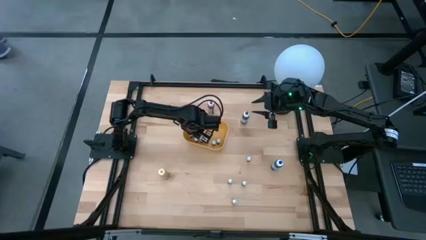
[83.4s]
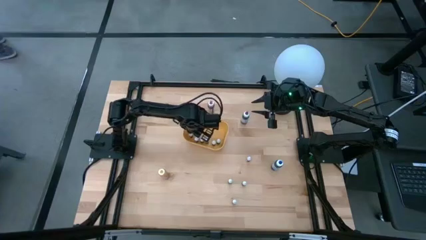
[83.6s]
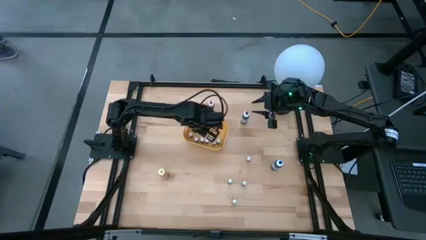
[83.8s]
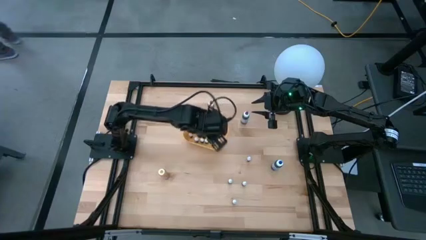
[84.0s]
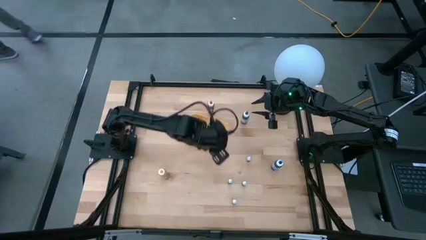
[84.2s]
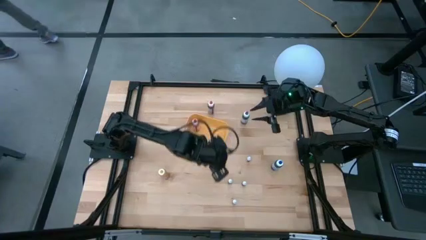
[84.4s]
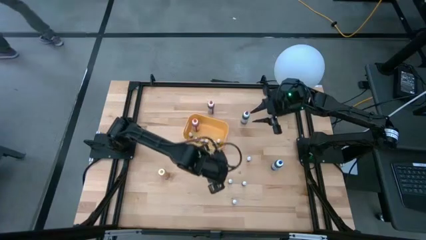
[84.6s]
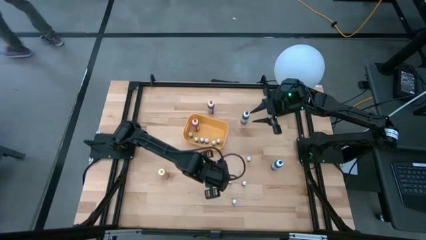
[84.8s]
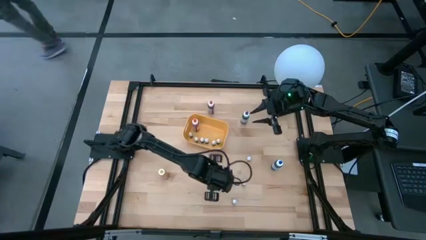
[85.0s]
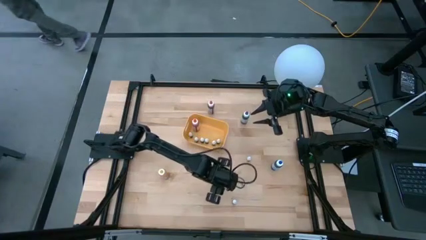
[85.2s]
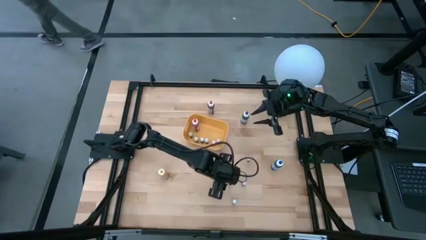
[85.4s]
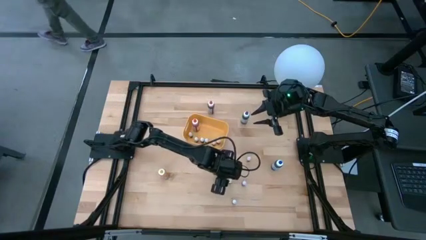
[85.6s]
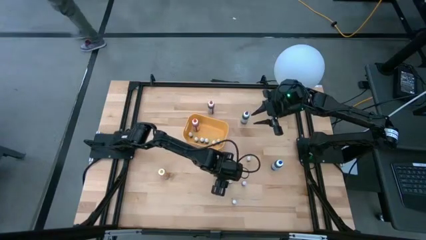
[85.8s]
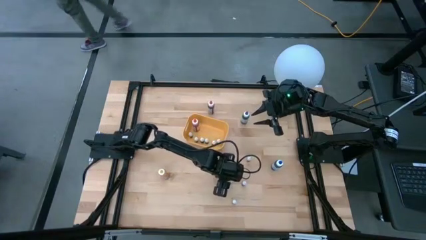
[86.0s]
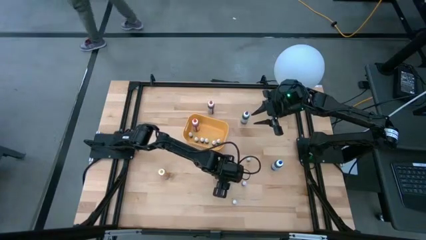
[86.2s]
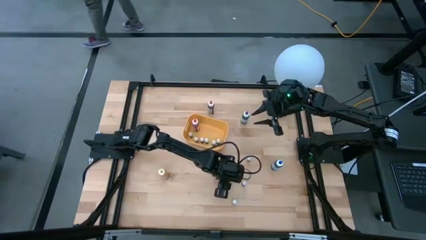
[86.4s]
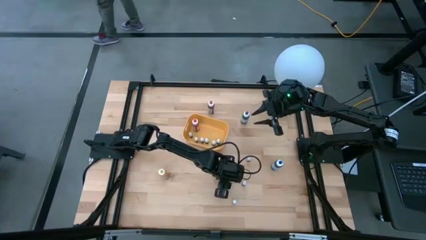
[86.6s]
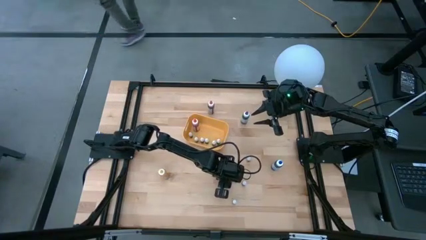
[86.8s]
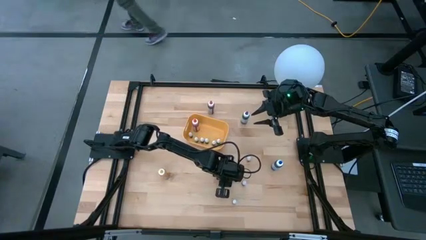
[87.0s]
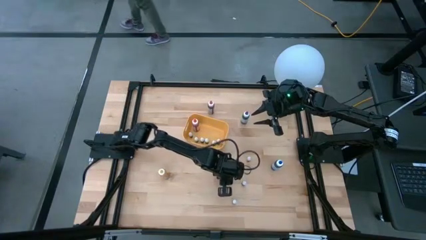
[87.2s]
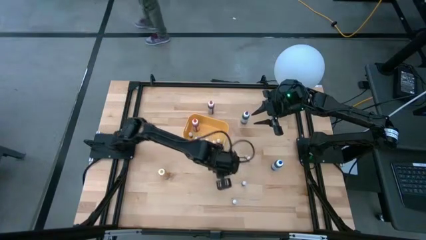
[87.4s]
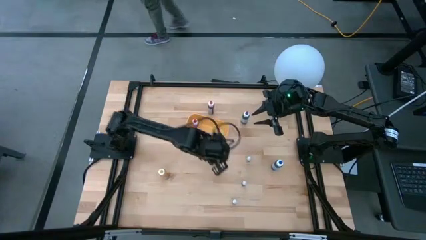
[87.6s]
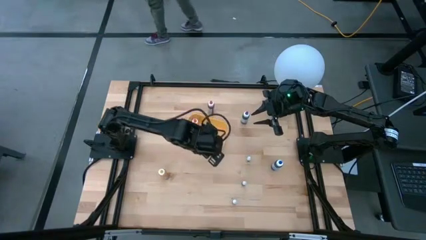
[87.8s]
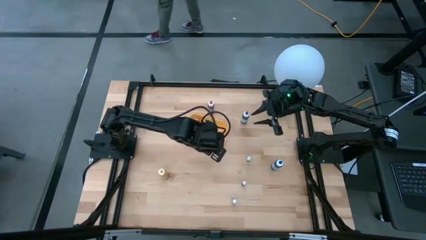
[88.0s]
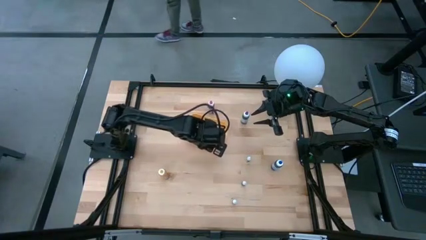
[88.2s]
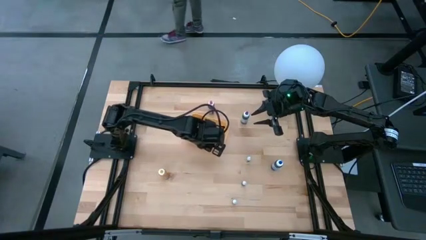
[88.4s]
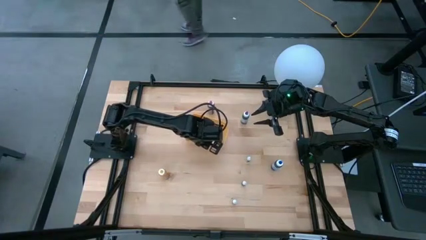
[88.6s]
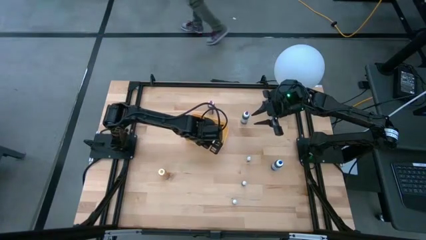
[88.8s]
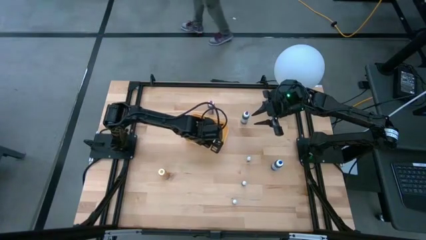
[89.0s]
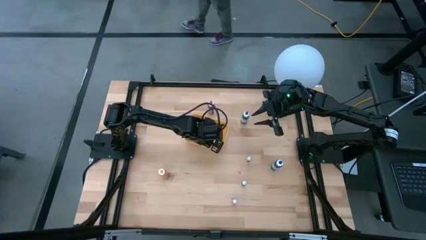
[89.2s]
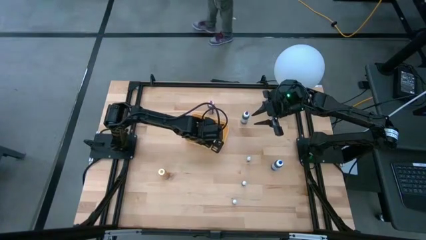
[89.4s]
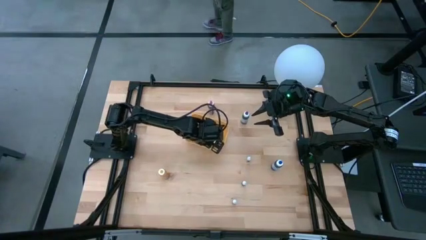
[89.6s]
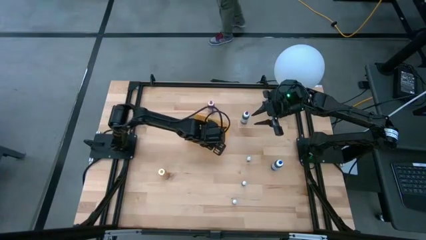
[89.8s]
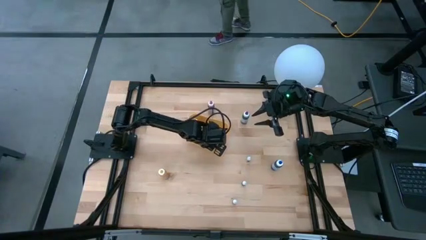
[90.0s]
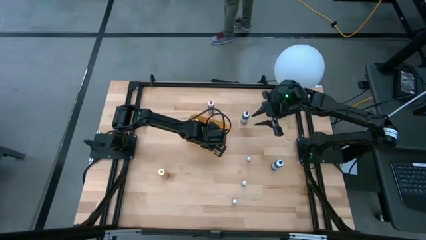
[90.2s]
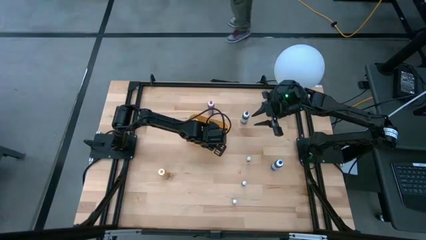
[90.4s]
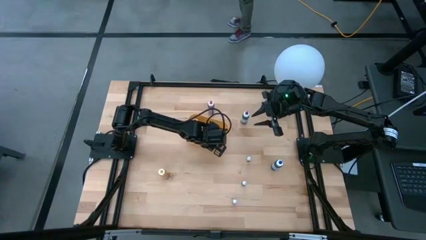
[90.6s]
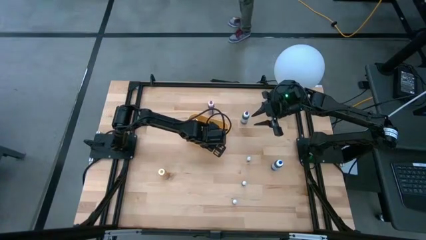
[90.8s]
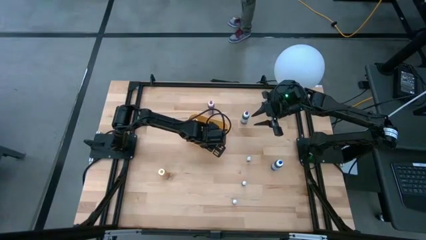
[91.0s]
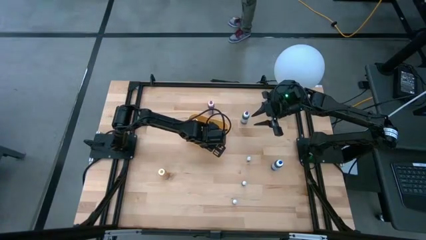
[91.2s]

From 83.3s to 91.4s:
Task: Pick & Place food coloring
Put the small blue food coloring bottle into the yellow bin

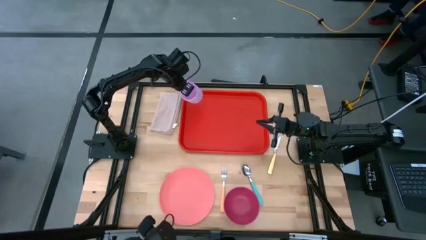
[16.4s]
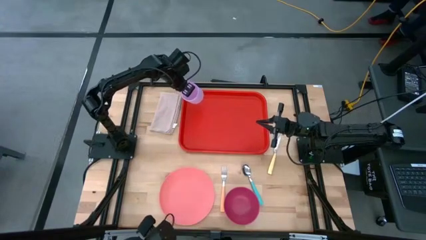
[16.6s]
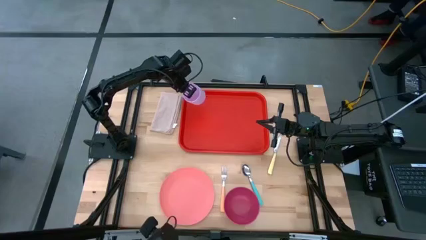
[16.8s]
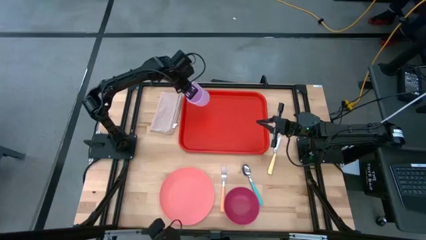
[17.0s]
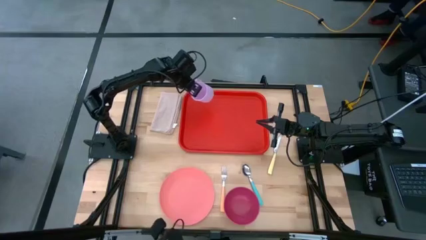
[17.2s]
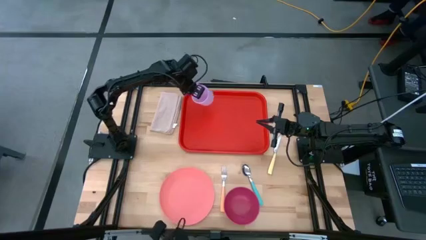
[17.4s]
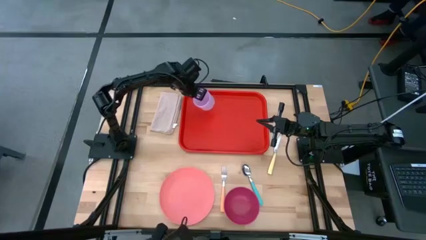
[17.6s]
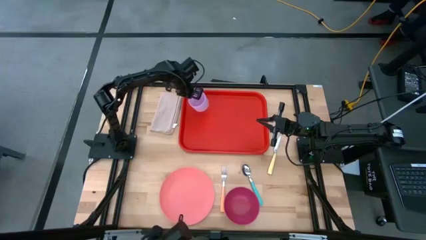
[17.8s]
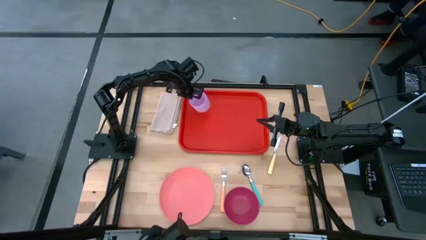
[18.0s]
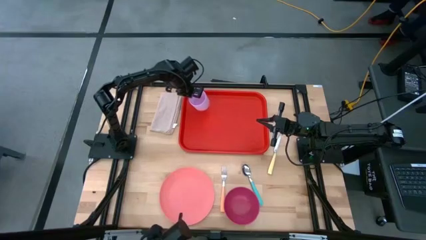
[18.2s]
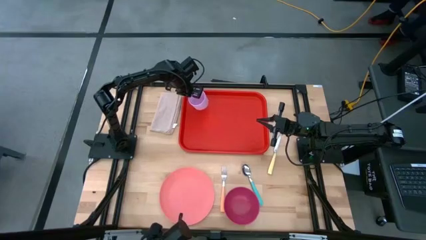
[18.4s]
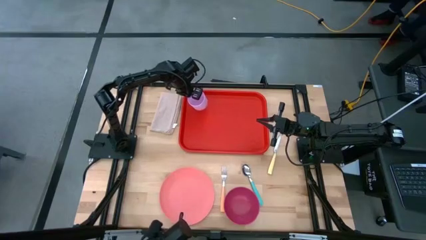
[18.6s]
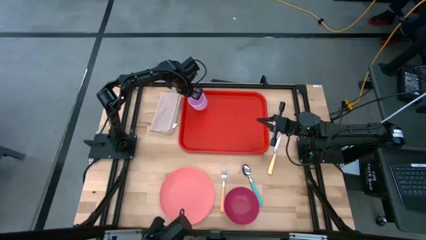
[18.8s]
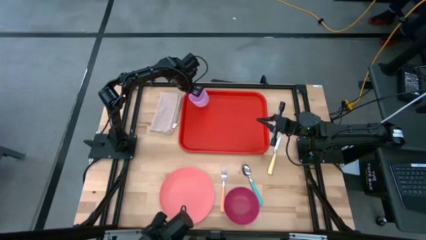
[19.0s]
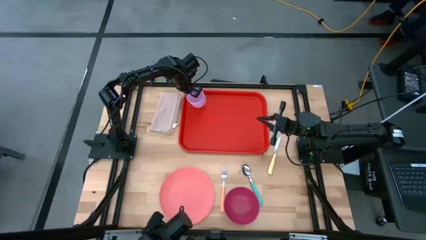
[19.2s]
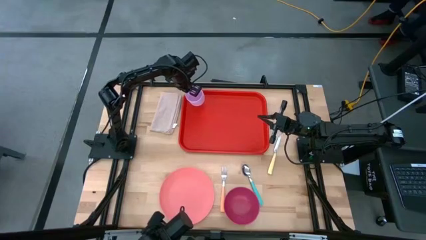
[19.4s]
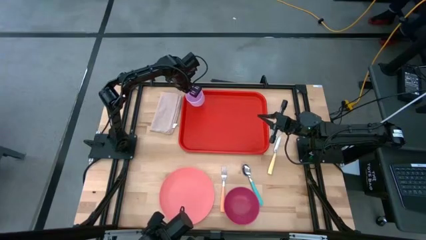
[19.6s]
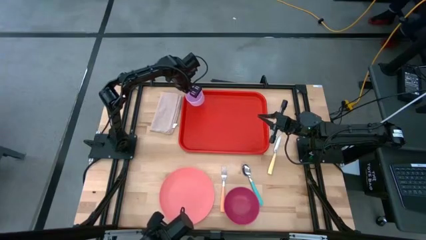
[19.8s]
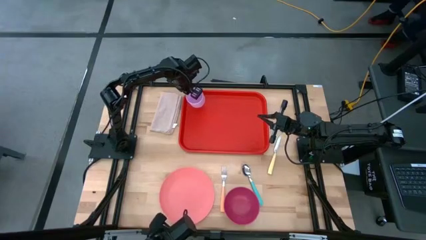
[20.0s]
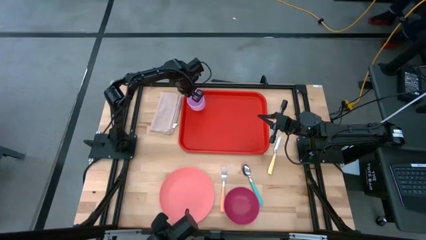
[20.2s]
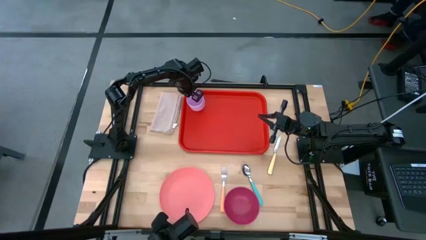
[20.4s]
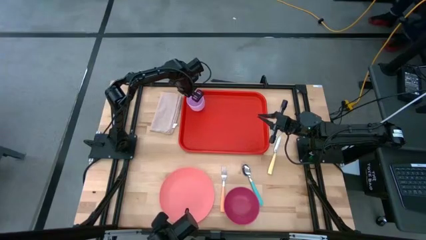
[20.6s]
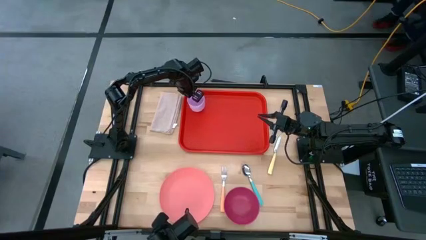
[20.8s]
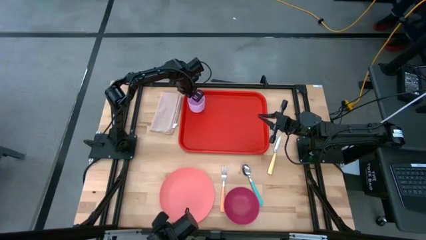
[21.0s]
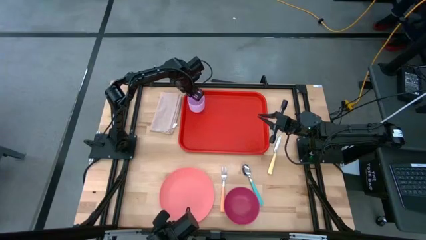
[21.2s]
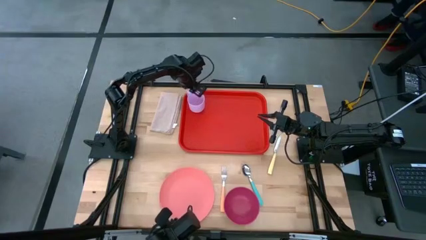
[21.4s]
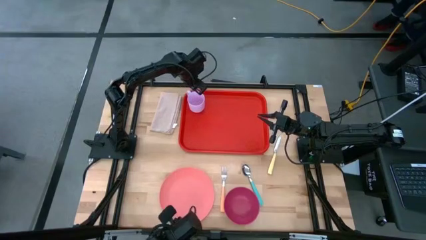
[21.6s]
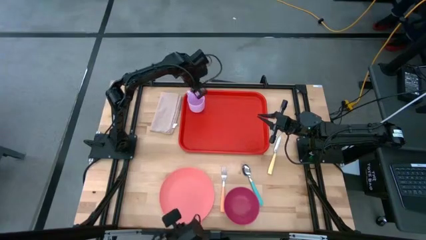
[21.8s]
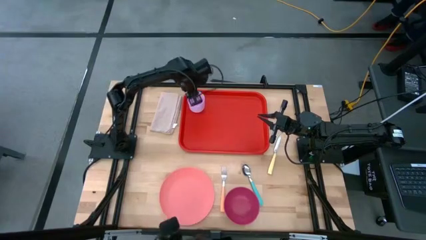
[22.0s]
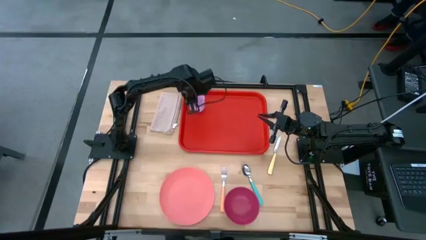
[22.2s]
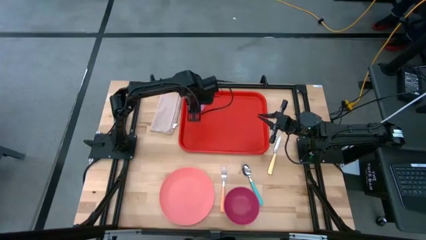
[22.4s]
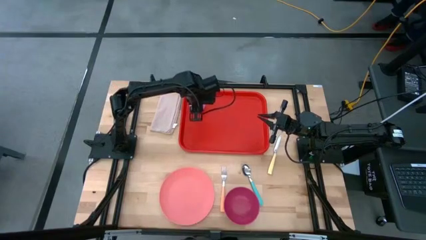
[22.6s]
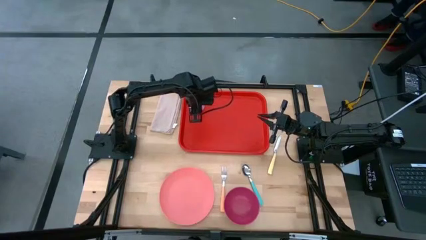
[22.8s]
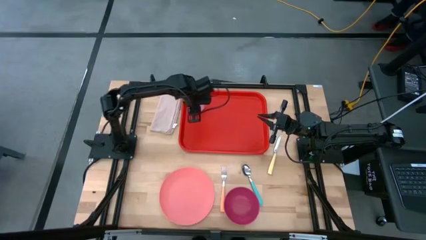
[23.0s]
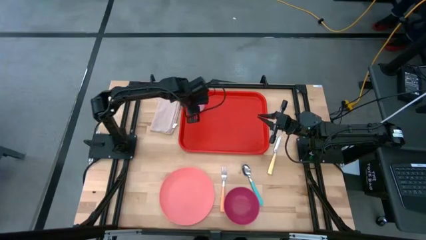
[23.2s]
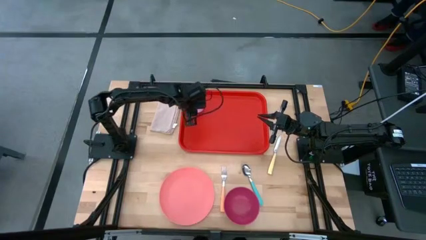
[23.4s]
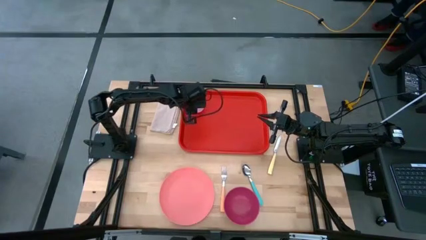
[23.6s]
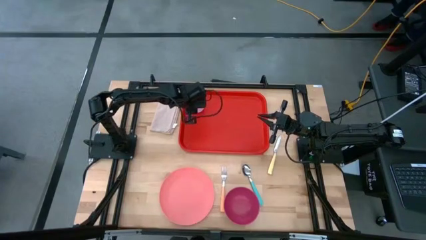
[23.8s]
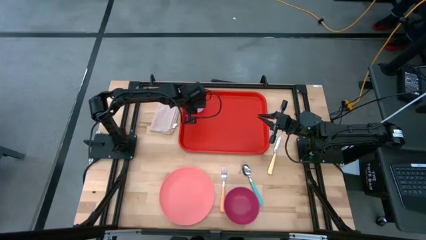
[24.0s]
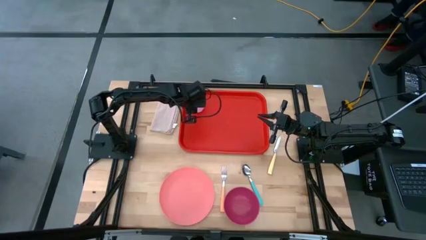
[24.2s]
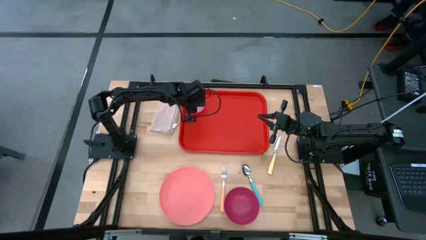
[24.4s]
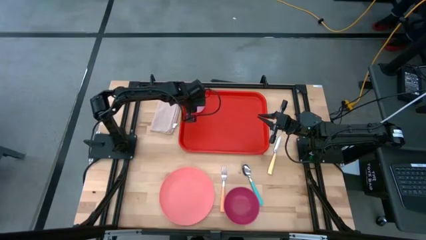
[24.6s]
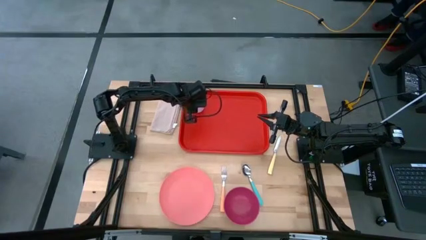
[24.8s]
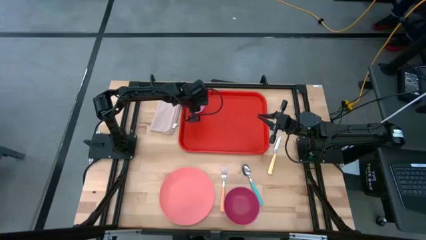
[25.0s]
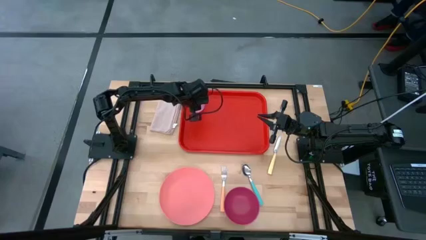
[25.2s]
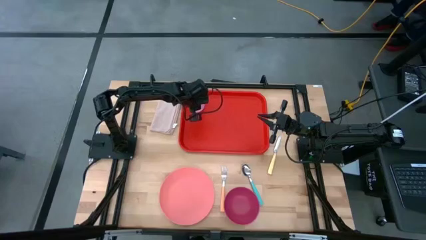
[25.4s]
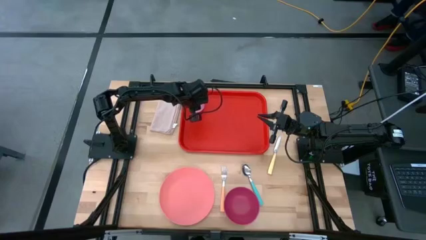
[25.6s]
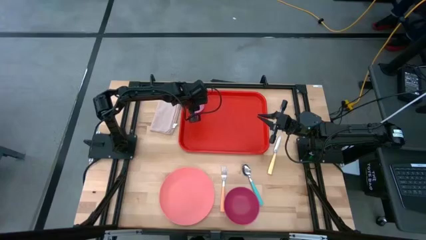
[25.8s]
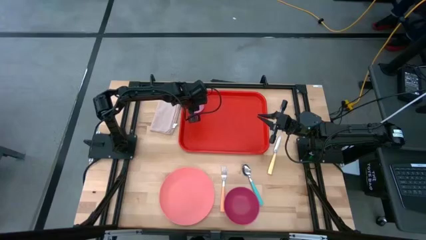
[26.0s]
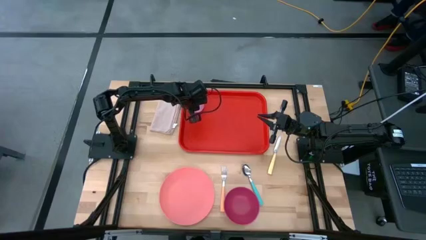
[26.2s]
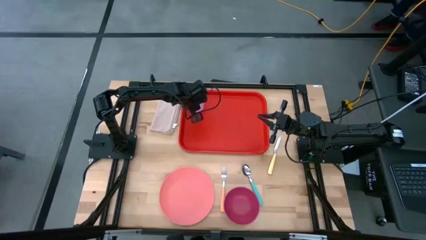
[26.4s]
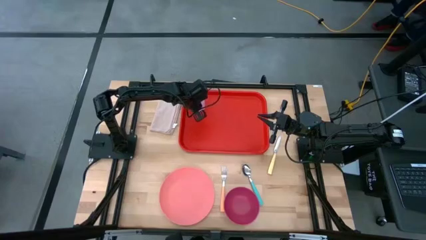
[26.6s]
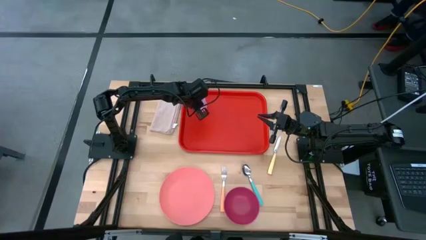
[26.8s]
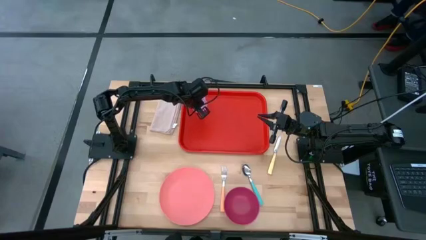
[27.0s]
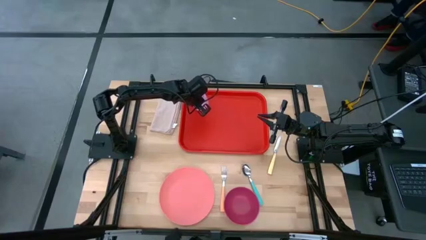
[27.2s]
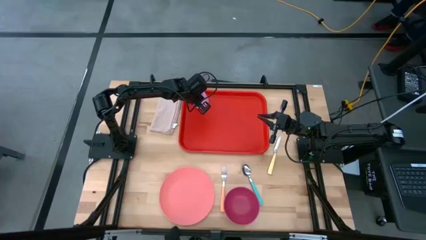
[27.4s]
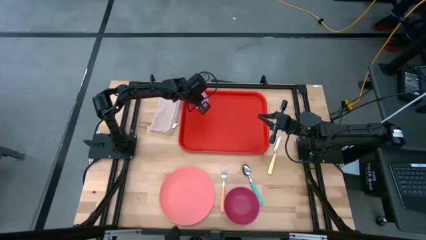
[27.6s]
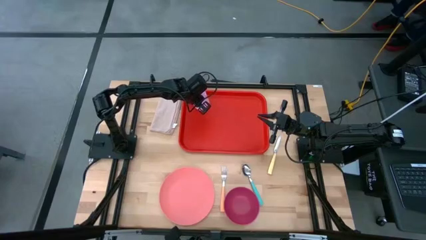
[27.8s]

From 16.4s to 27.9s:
Task: Set up tray
Put the purple mug on the red tray
